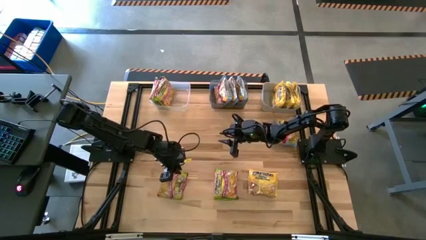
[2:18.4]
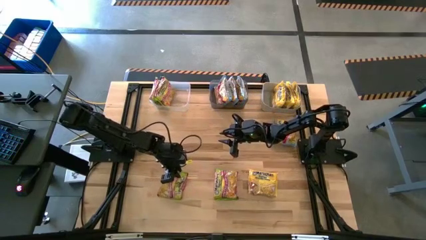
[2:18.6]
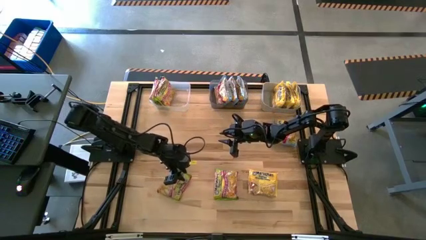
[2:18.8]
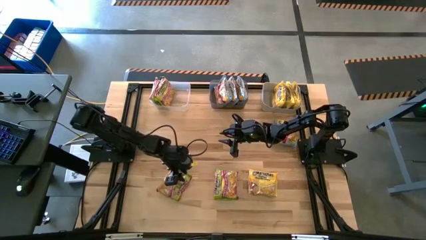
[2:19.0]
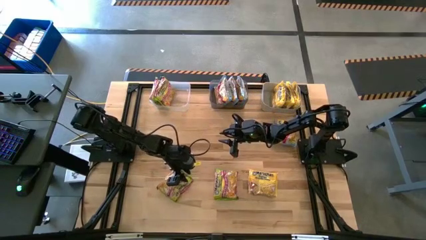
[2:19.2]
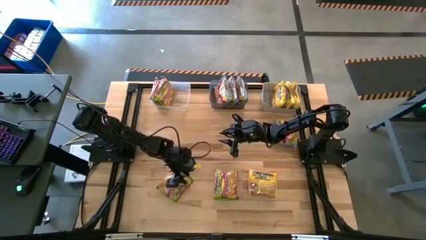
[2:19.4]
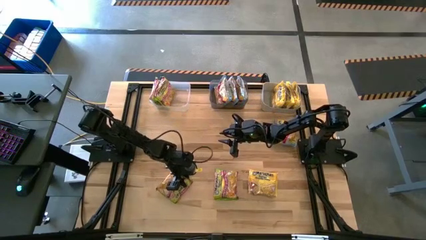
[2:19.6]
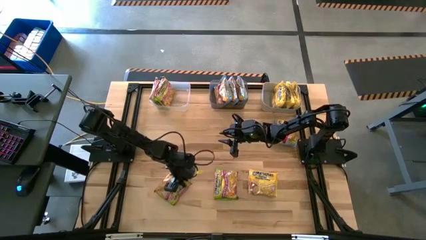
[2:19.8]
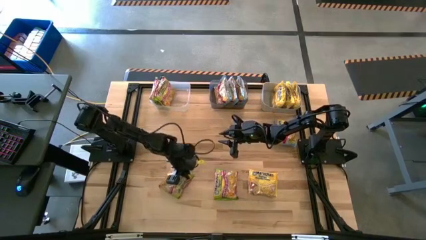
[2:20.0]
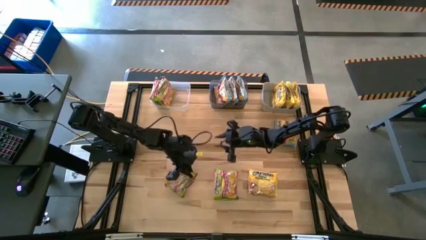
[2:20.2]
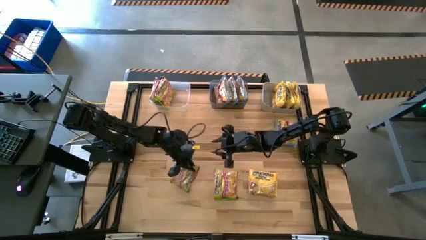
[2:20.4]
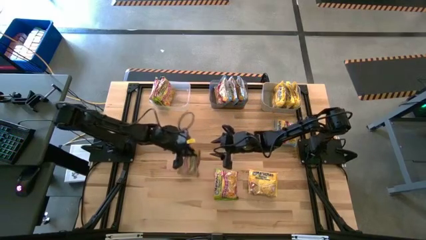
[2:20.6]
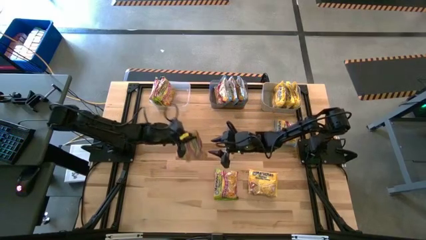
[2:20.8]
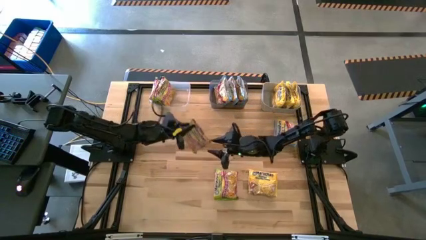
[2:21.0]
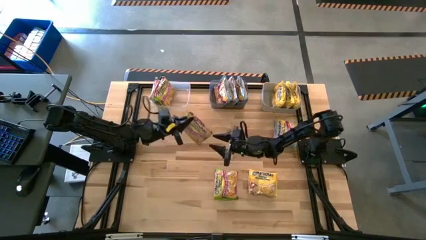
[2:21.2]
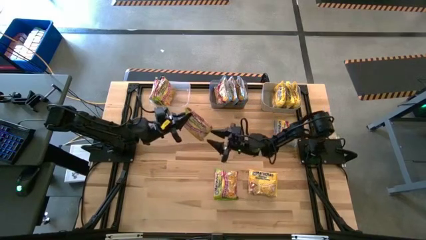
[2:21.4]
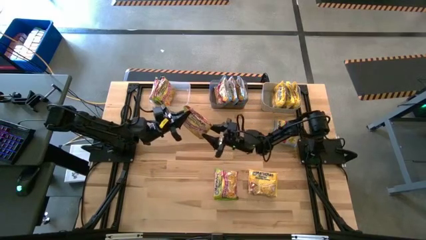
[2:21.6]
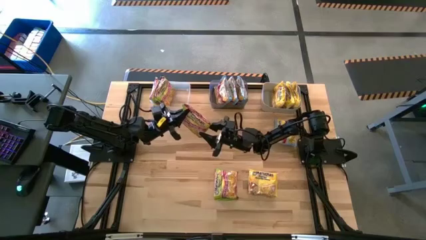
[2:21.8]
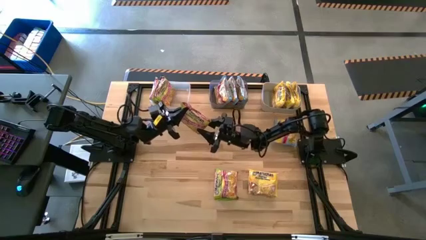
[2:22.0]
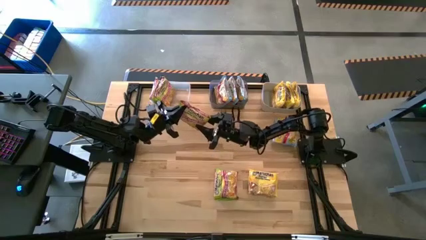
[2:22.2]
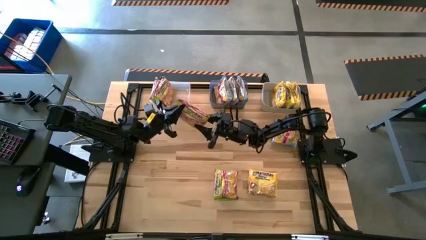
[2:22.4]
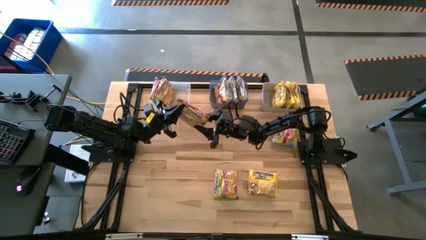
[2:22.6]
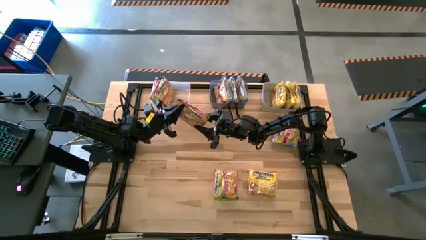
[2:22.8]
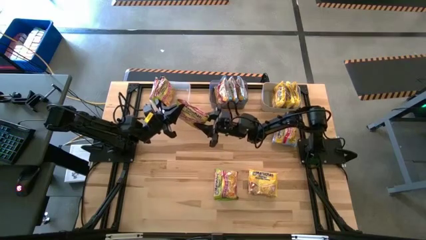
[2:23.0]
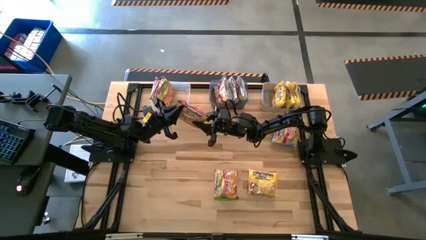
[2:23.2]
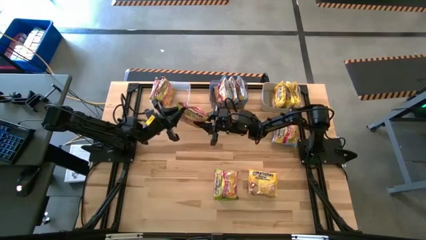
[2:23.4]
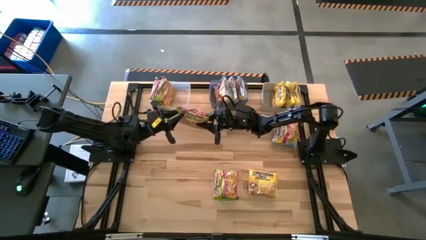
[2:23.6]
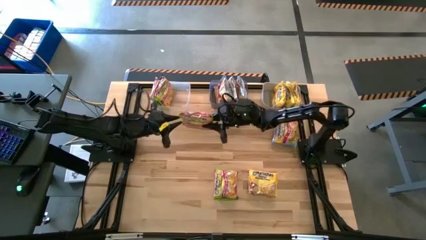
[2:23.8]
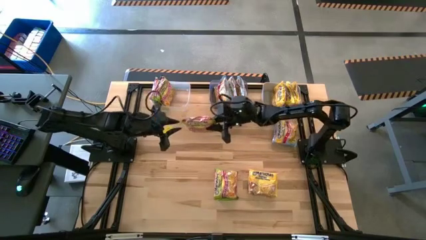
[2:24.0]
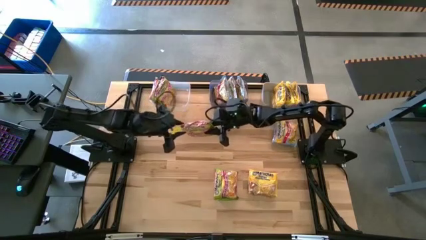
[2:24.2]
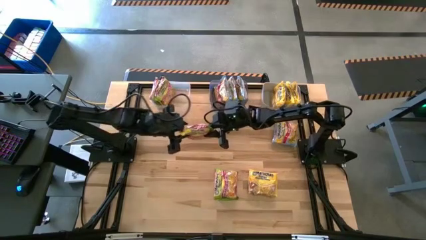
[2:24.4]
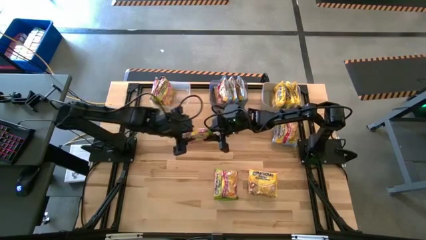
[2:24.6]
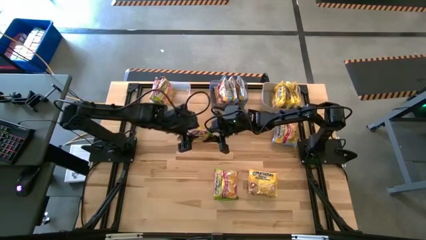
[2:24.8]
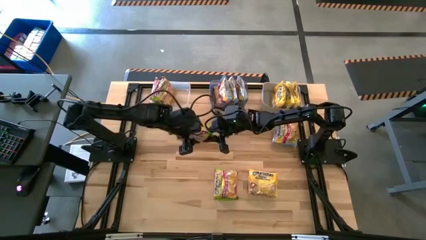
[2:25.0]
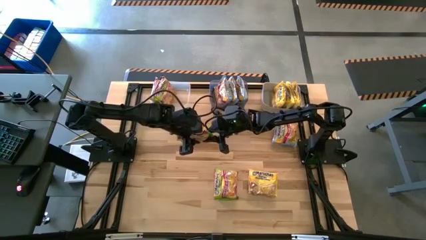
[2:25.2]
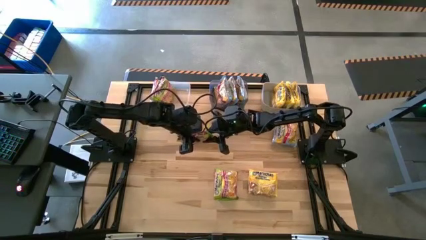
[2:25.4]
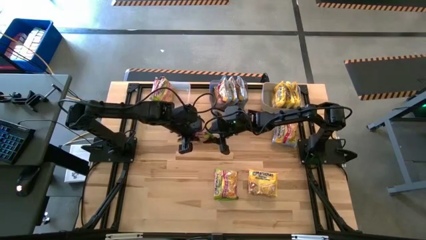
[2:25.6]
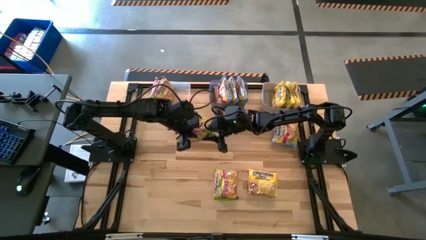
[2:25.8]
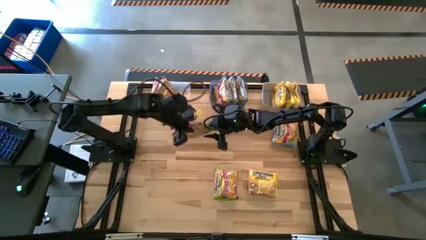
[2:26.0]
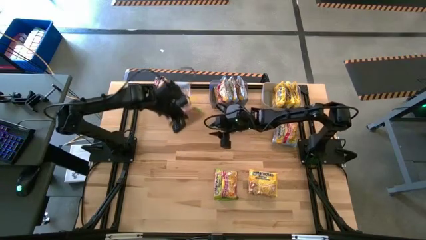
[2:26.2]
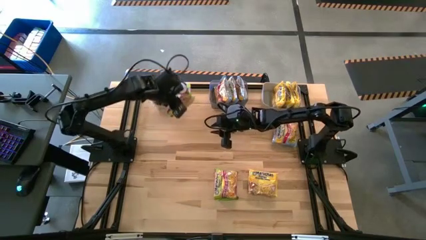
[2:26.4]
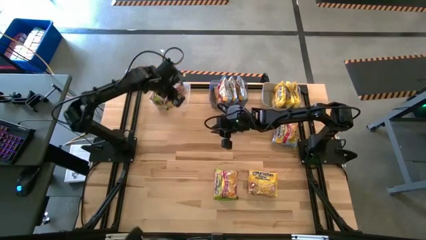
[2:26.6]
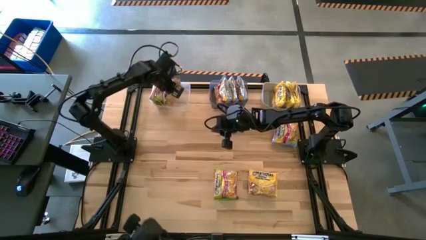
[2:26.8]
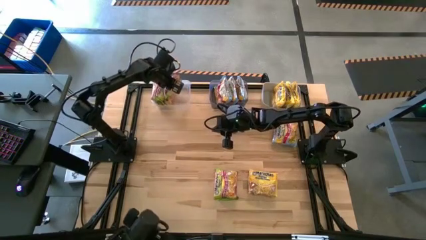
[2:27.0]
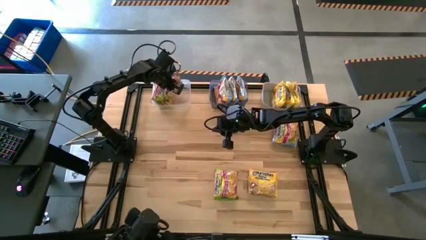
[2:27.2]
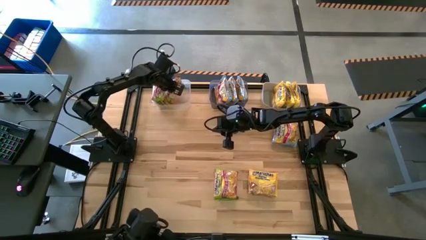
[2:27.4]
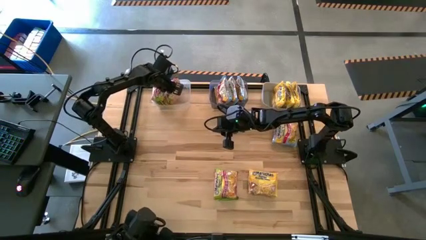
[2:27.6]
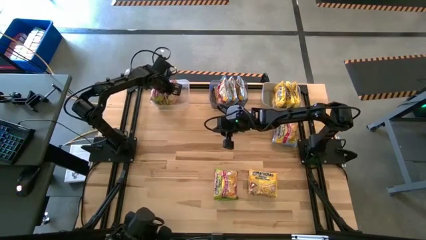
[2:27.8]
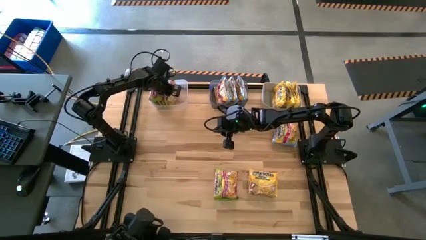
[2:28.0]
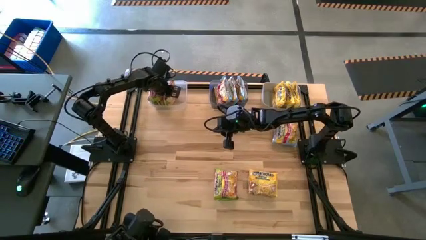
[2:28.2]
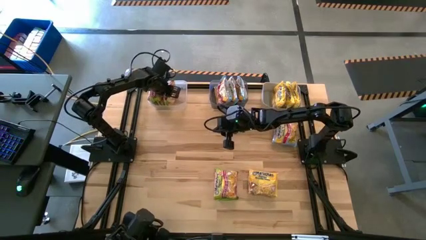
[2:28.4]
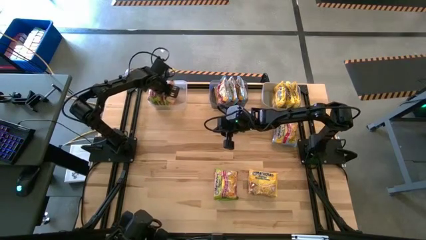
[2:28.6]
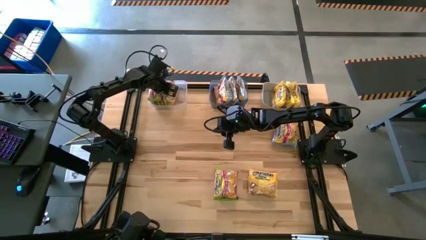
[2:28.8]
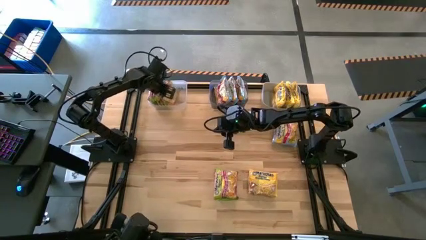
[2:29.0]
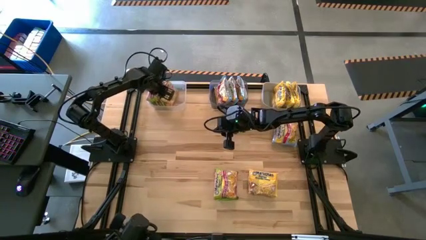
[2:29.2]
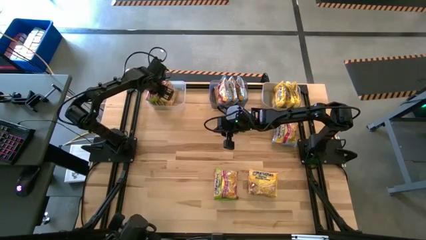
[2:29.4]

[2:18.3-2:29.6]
Task: Sort Maruchan noodles
Put the left green noodle pack into the transparent bin

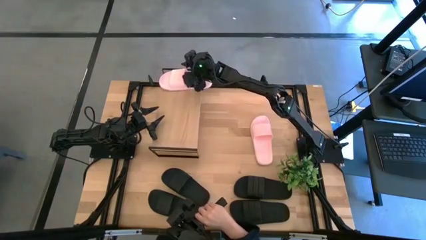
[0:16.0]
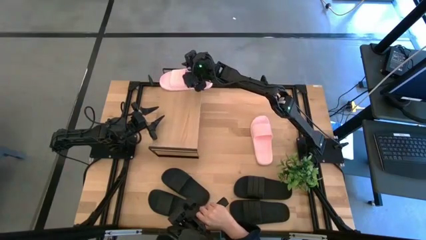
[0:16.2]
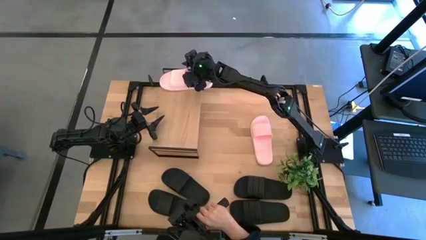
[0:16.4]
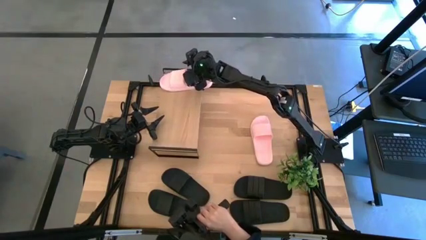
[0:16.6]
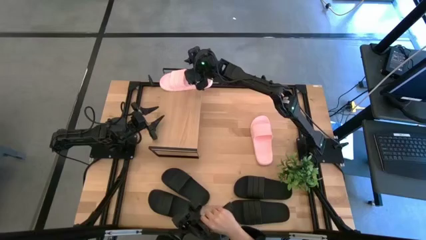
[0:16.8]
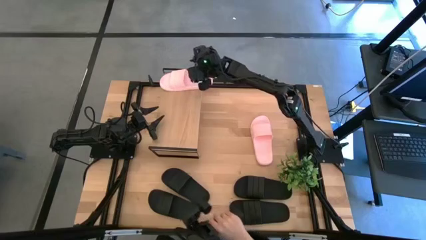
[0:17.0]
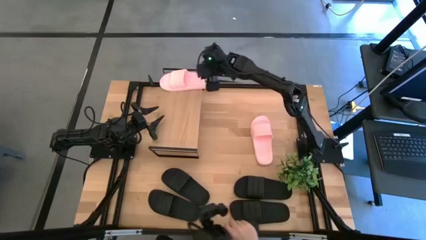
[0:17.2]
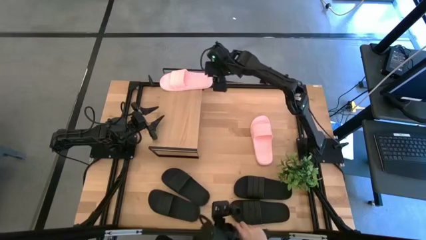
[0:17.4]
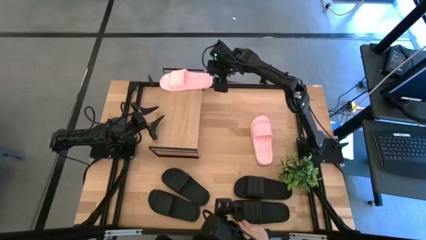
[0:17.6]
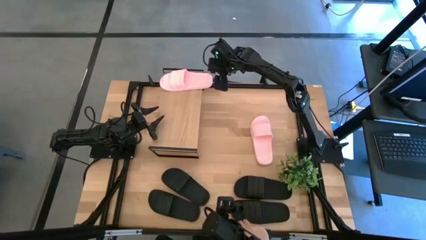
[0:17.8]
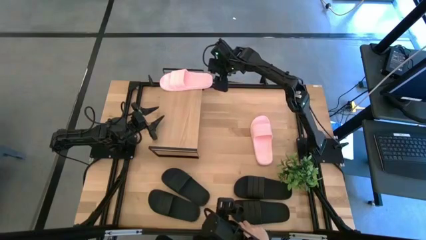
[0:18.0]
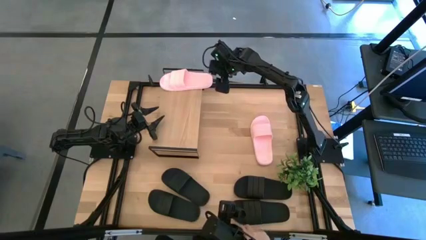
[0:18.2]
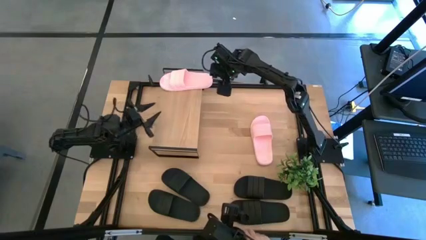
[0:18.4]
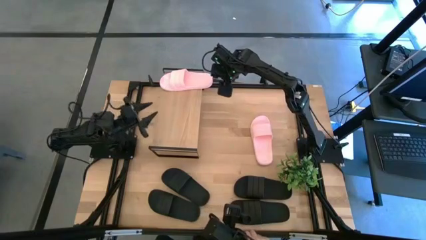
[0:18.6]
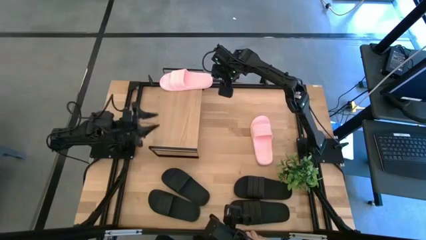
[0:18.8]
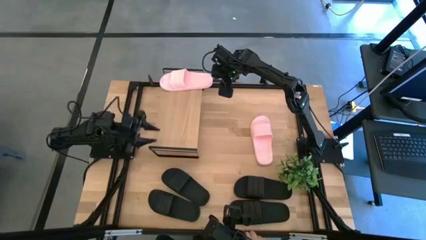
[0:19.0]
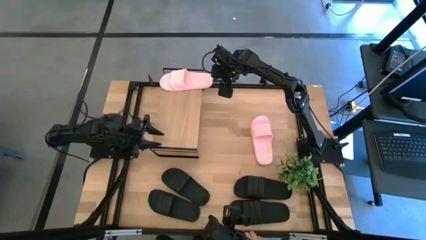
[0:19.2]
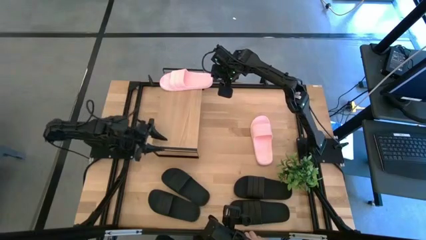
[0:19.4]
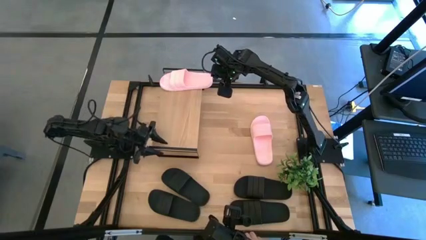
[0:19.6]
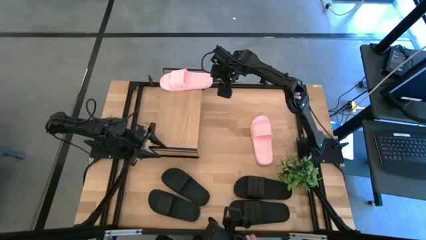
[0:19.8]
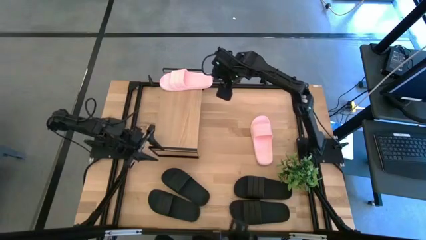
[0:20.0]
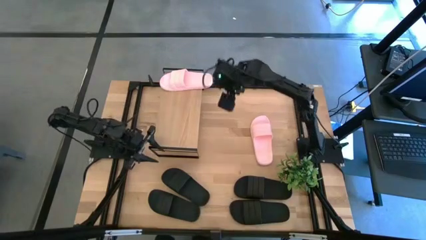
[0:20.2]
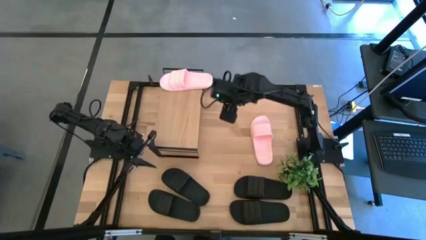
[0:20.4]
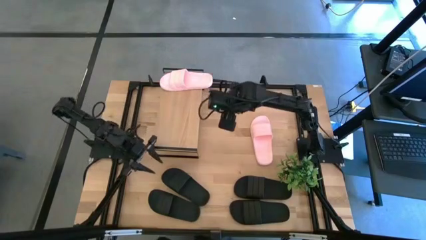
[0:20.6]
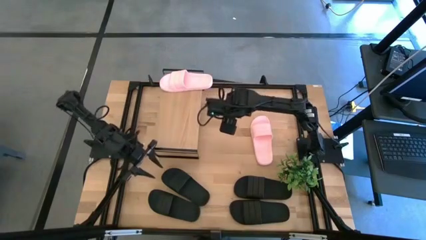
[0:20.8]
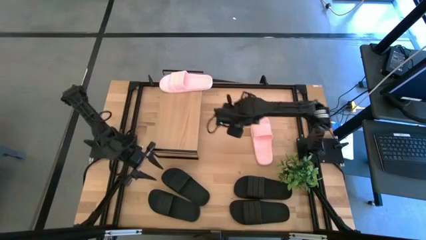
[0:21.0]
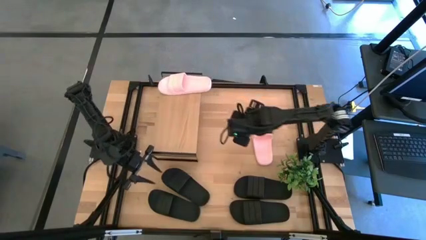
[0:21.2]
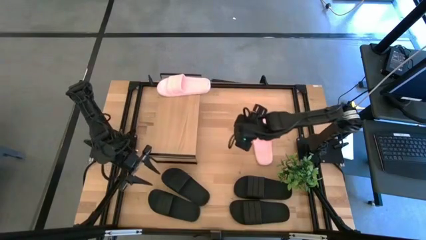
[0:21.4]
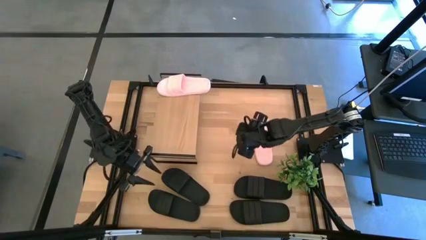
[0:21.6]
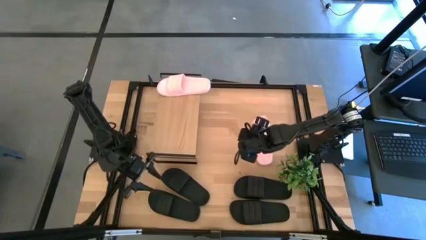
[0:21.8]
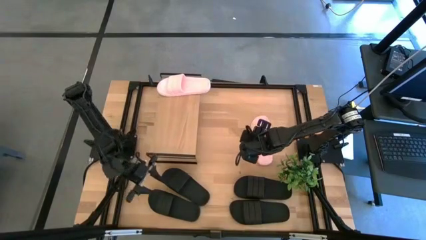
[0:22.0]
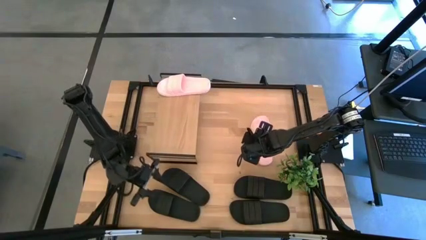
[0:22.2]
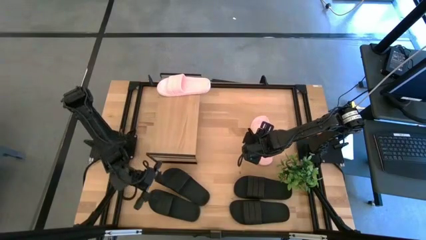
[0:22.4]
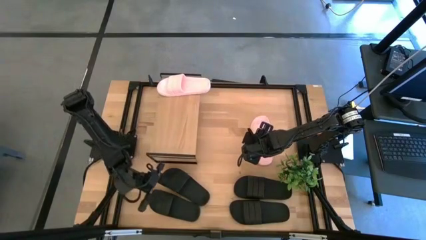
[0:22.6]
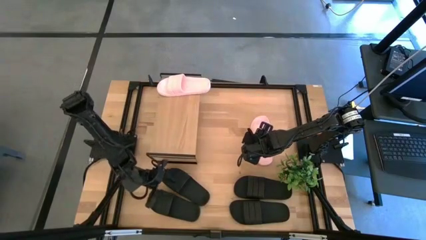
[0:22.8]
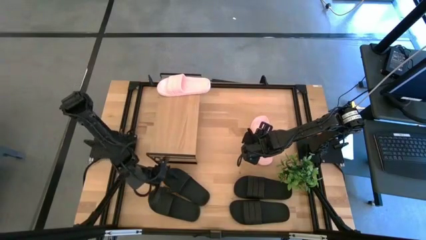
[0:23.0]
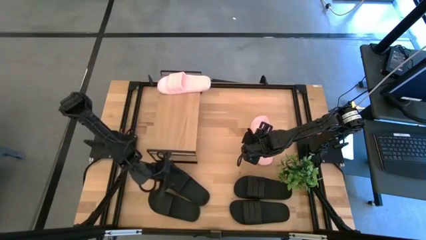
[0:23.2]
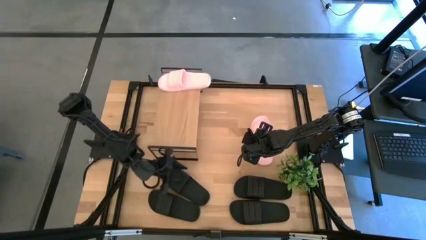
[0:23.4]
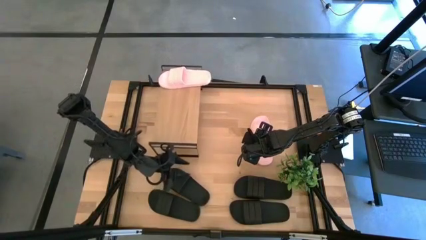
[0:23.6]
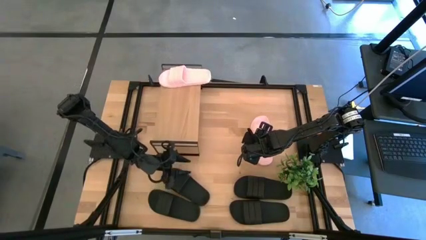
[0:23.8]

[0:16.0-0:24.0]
Task: Pick and place slides into the shelf
Adjust the shelf on the table
